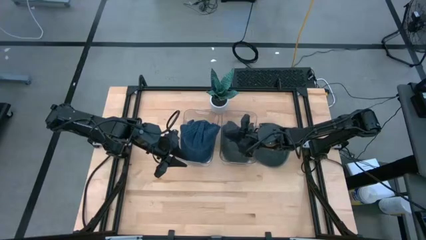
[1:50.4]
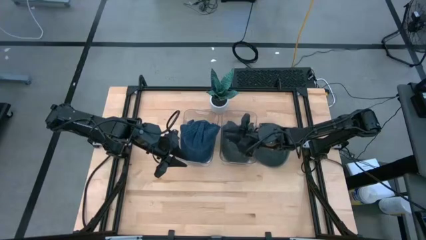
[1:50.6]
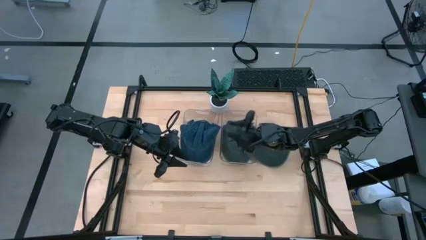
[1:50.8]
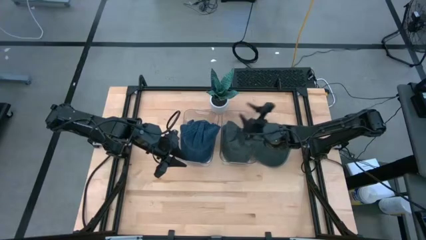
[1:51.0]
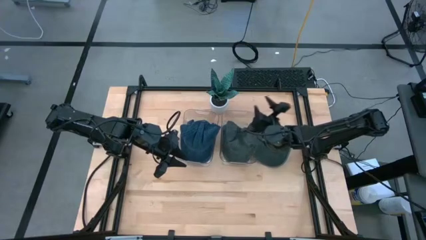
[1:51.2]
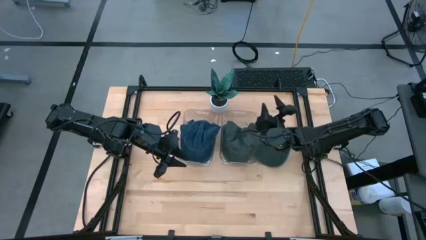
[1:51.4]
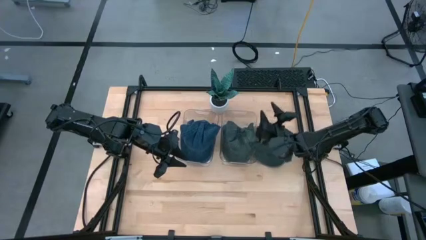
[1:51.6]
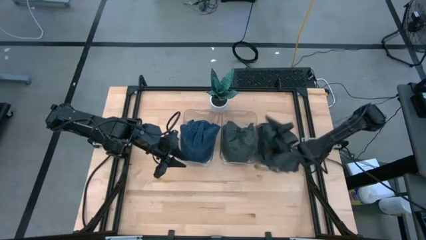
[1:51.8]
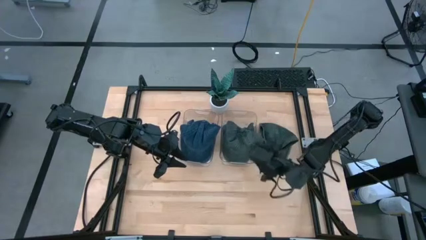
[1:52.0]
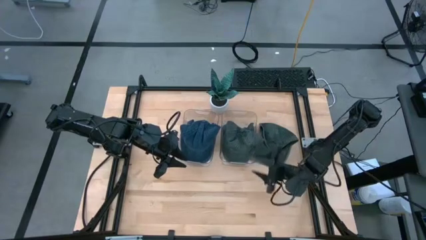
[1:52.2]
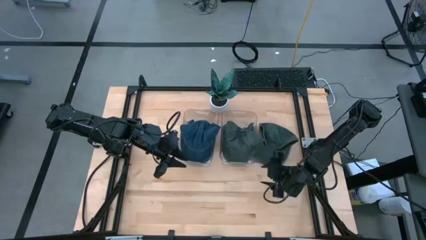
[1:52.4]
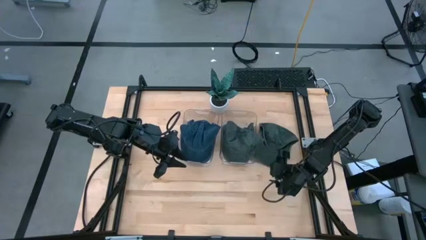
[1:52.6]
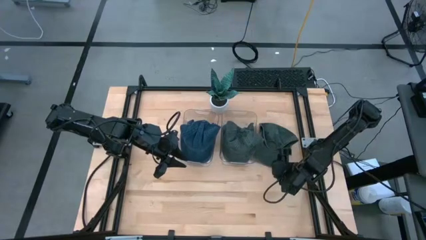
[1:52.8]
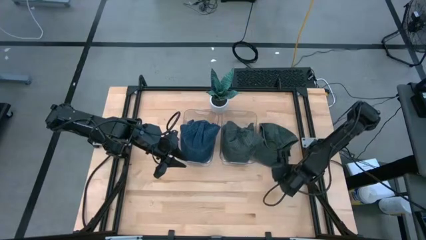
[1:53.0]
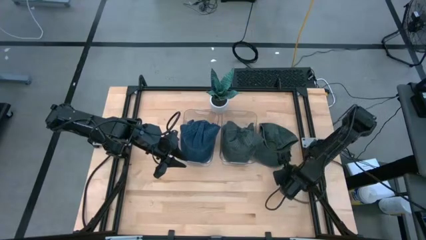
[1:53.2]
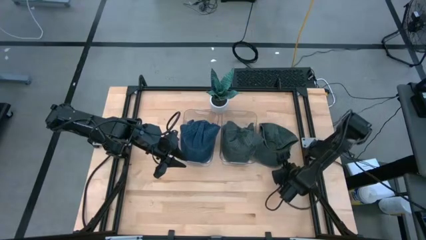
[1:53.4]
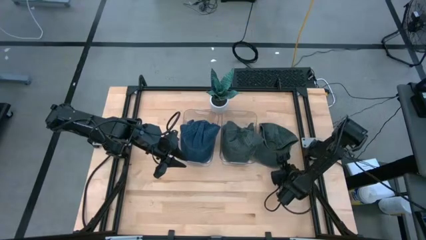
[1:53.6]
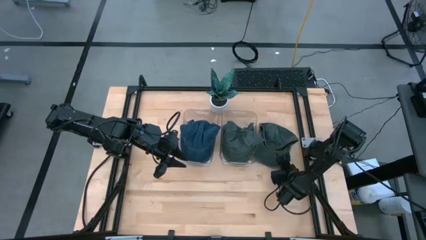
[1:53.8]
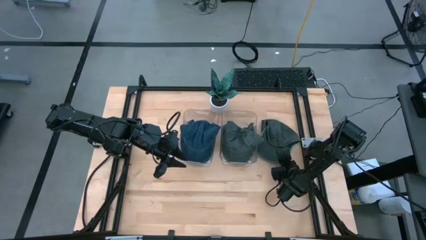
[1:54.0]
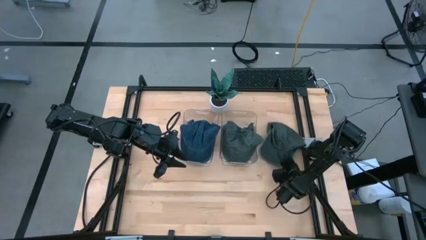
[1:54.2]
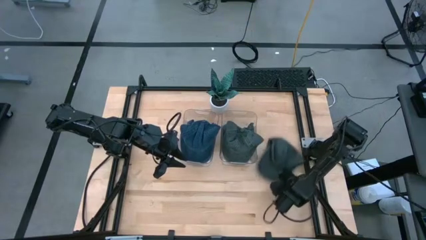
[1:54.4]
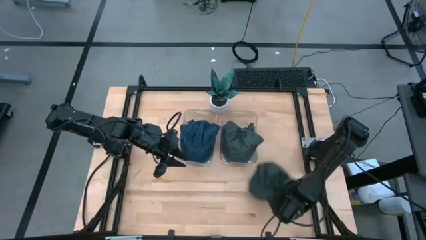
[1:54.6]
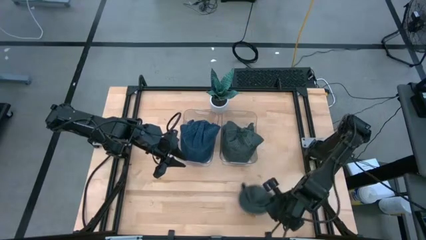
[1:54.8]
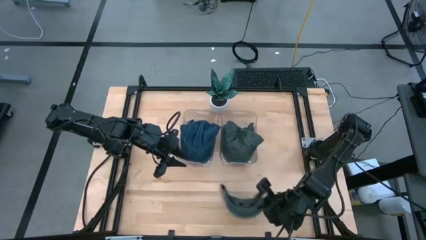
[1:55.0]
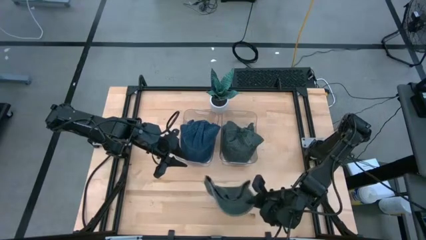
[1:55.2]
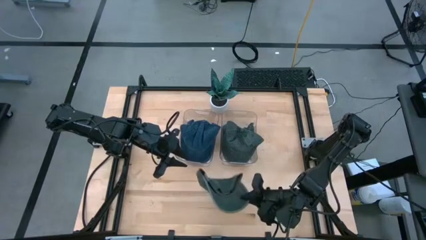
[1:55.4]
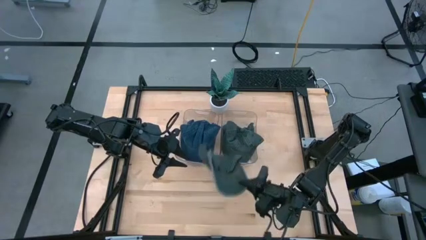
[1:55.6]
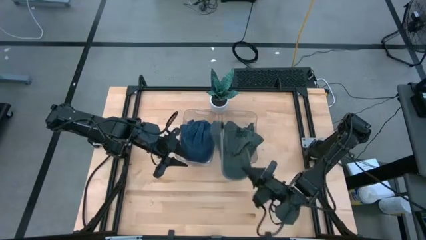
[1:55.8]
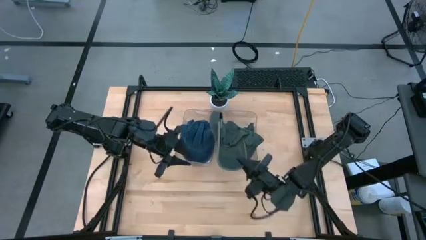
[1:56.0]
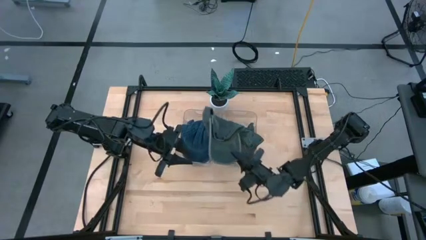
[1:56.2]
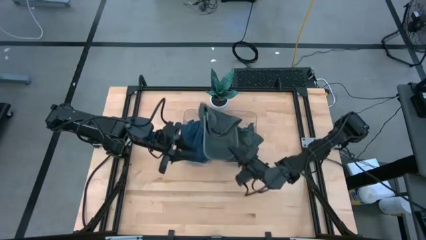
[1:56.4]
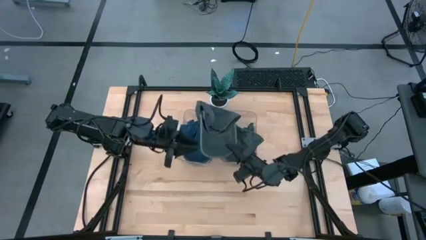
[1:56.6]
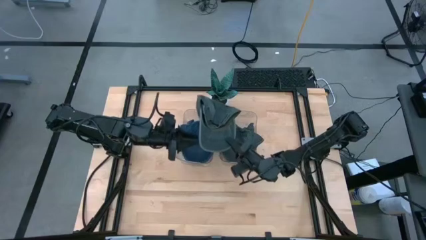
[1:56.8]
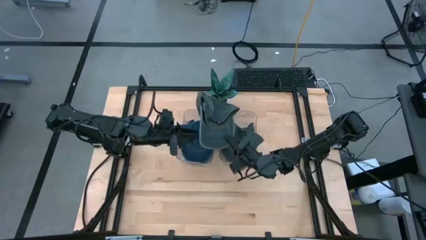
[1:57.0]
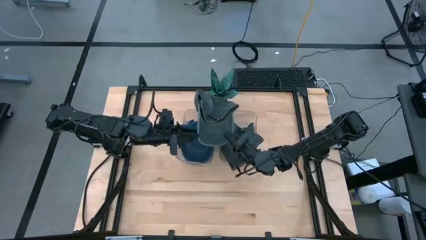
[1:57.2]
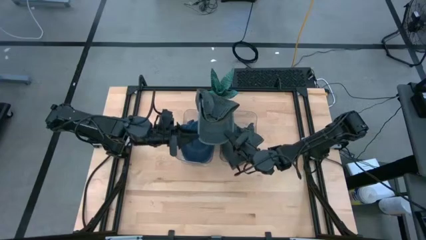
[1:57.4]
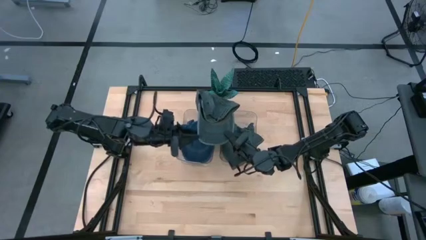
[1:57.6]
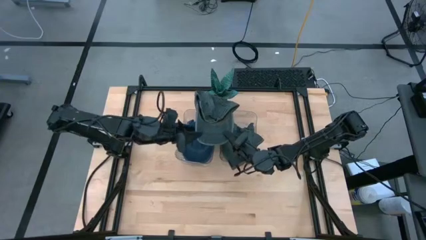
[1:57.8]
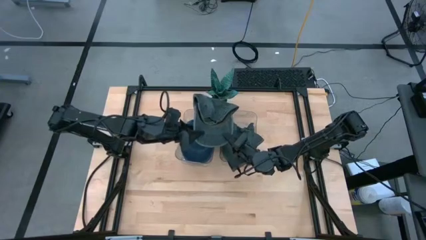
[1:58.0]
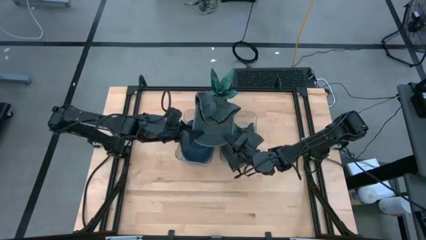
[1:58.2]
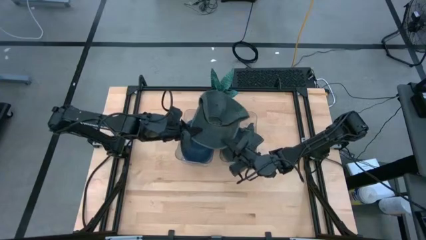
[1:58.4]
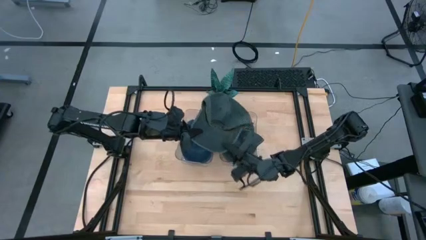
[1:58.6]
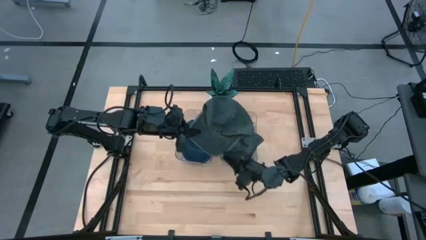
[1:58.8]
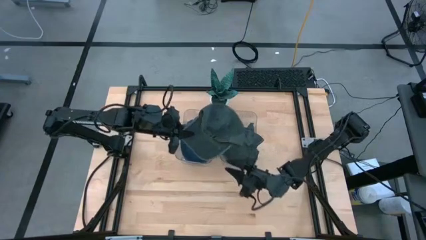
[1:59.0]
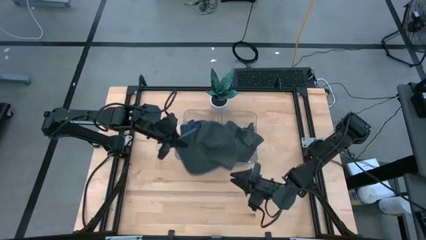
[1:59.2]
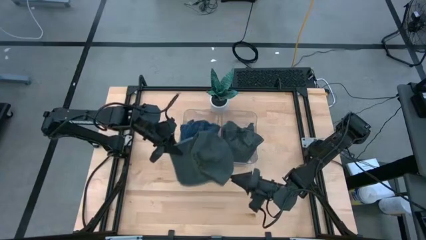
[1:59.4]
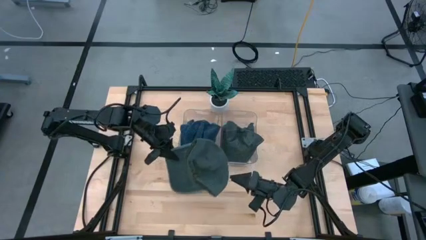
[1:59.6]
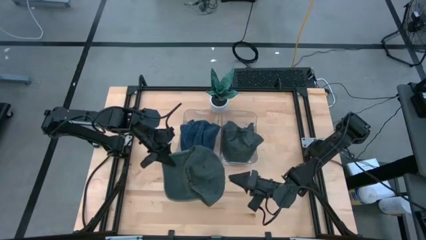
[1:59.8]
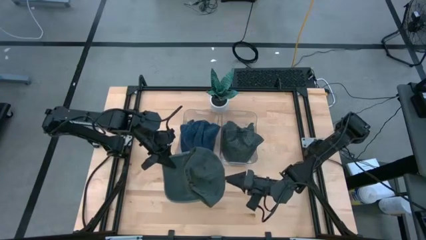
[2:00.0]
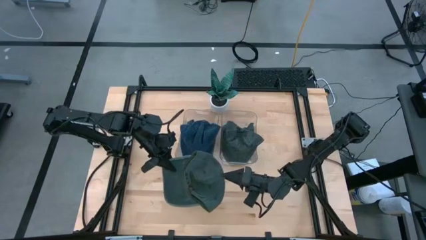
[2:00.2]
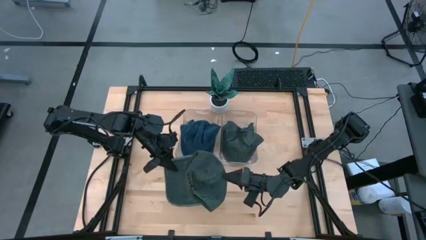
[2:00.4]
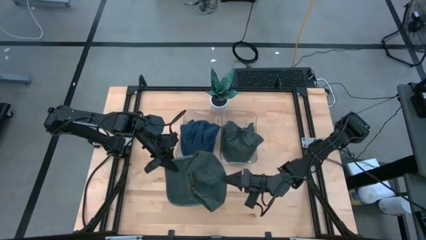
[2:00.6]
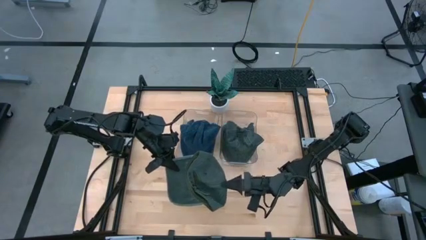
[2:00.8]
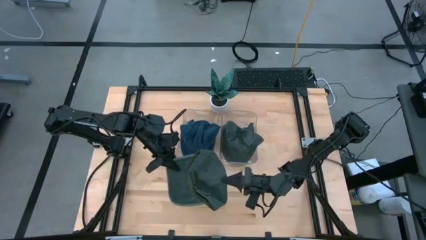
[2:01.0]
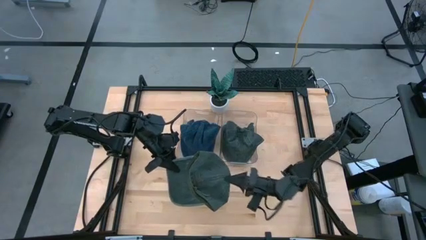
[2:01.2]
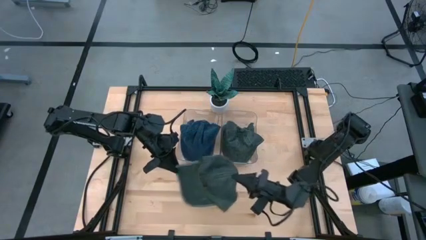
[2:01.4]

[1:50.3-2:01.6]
Task: Pick & Place hat
Put the gray cap into the right transparent bin

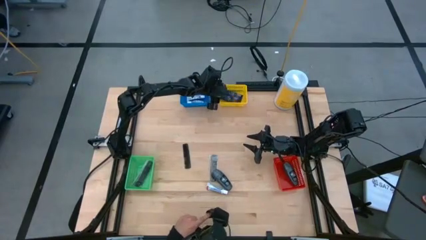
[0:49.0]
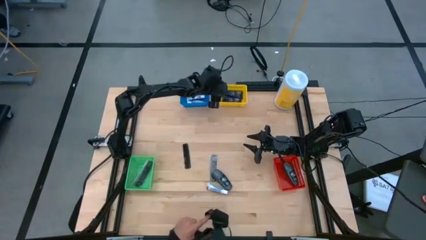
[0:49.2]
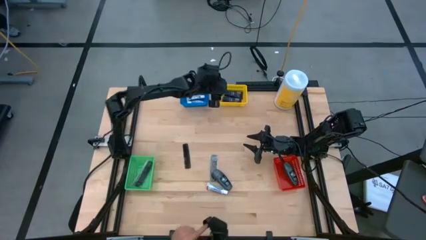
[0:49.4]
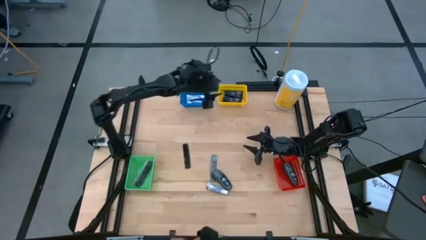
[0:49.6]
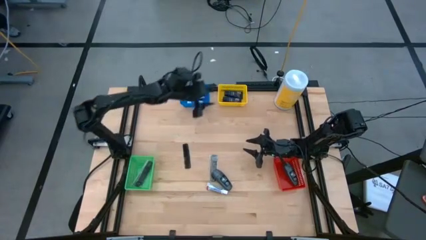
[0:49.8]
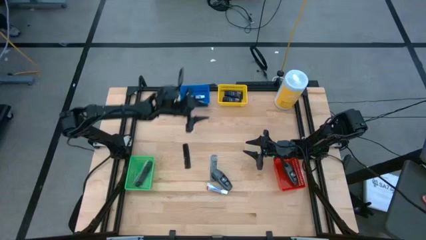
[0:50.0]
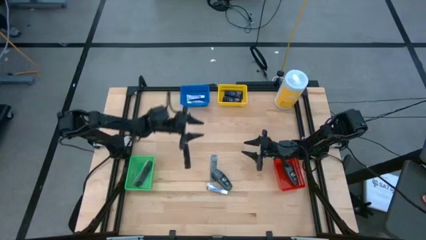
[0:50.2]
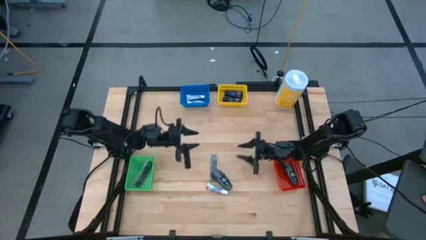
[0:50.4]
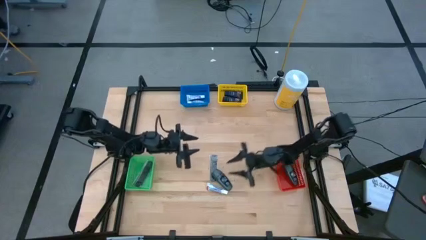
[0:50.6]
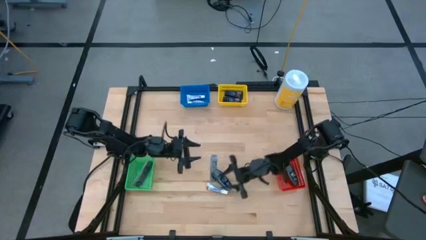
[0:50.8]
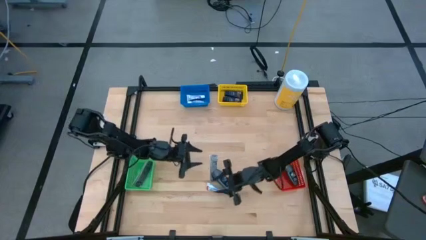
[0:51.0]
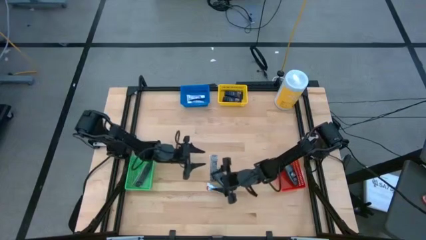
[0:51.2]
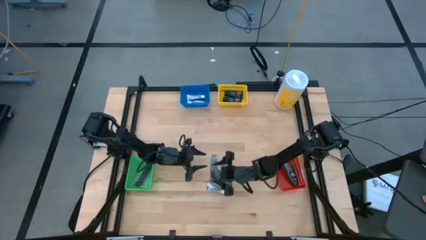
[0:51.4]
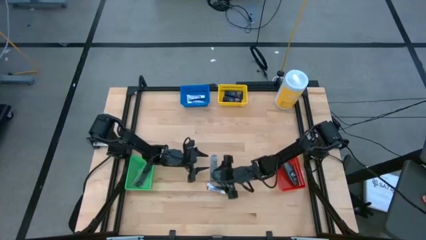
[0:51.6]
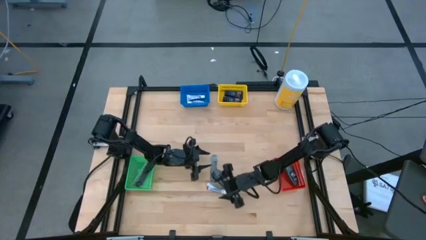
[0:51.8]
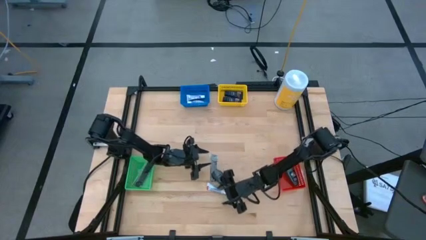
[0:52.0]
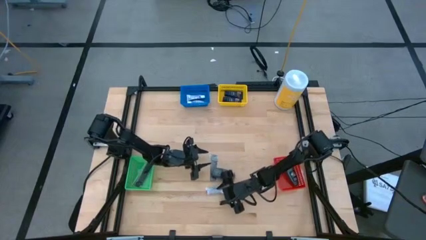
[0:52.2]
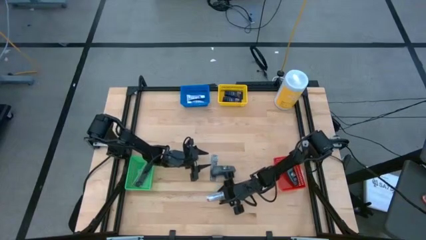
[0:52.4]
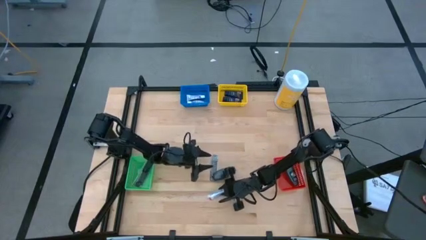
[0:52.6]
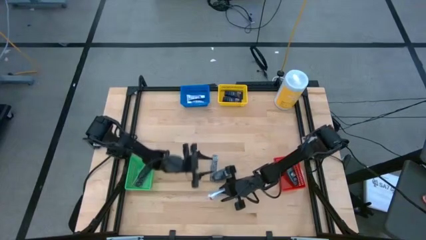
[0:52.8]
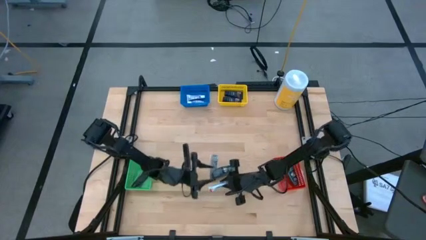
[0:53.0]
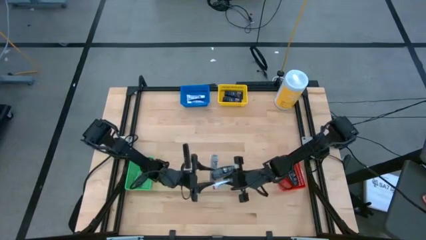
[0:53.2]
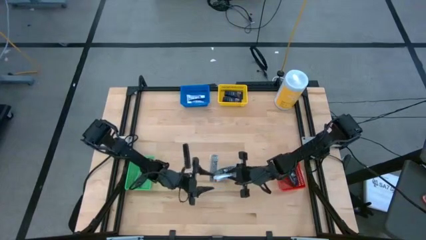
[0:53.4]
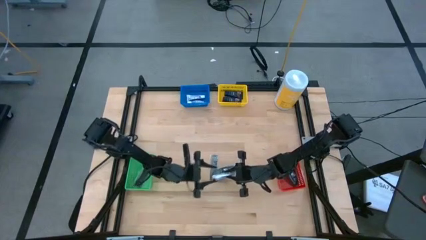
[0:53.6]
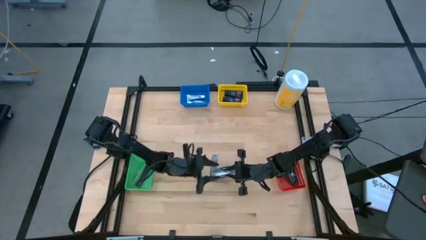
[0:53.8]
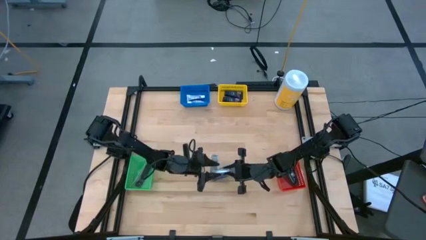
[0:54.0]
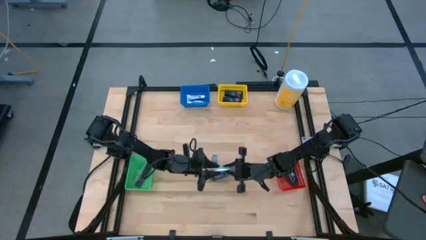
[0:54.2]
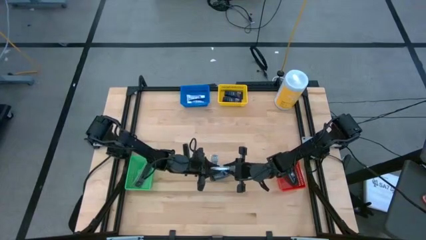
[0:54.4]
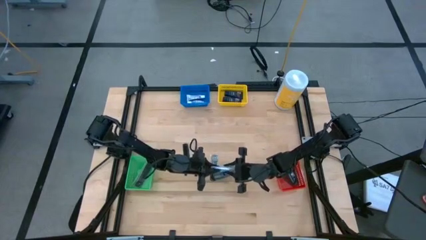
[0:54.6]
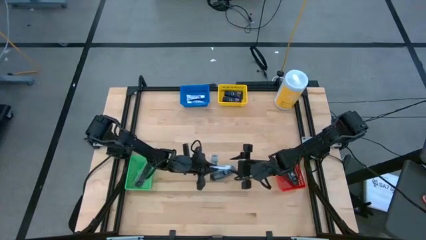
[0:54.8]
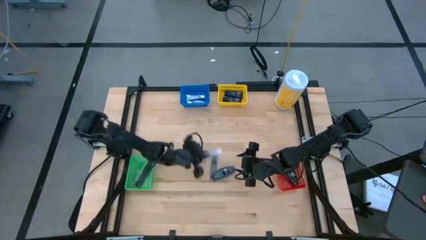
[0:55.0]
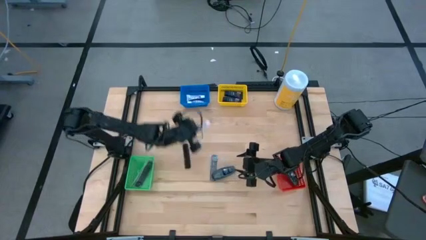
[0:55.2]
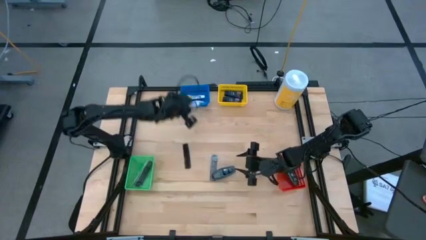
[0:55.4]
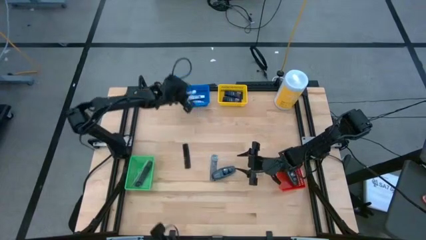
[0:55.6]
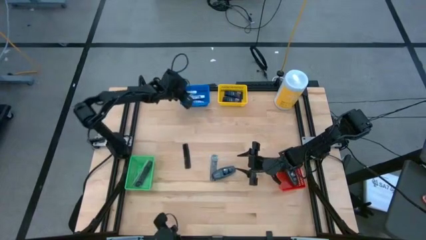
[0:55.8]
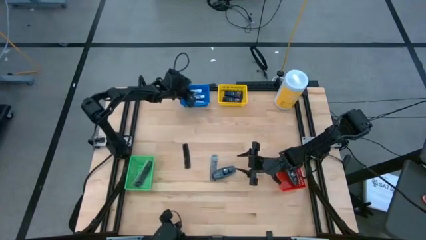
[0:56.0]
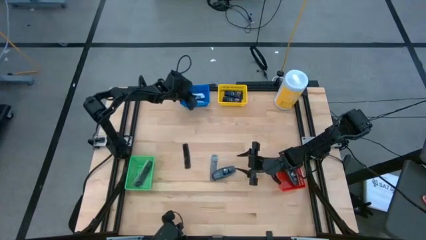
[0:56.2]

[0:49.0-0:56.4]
Task: Pick & Place Travel size toiletries
Put the white toothpaste into the blue bin
